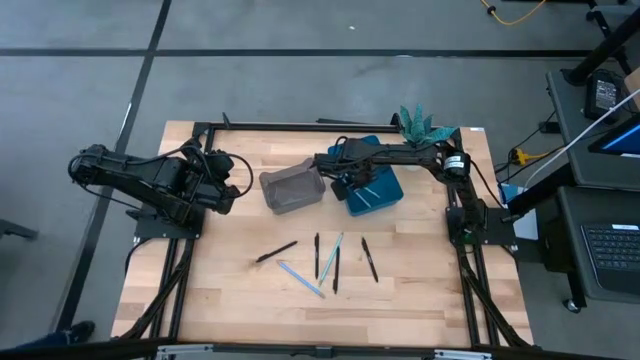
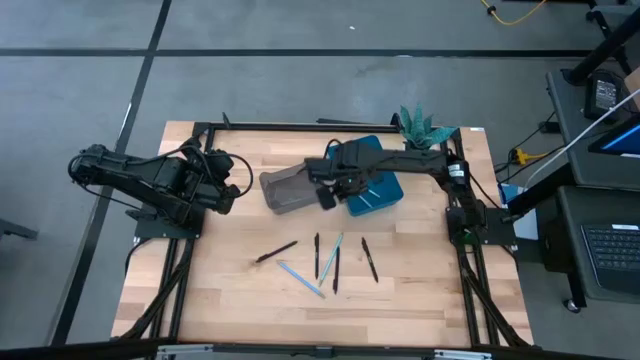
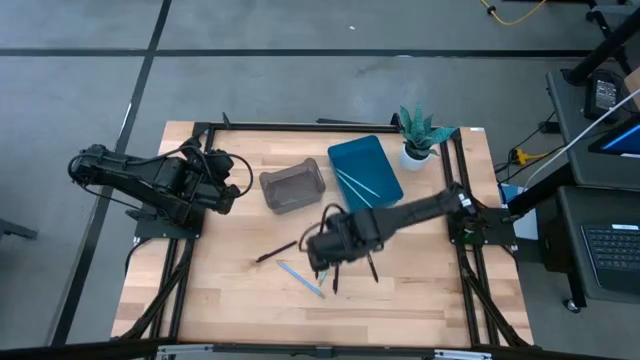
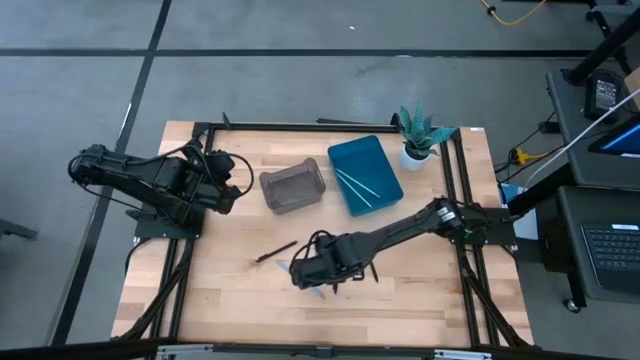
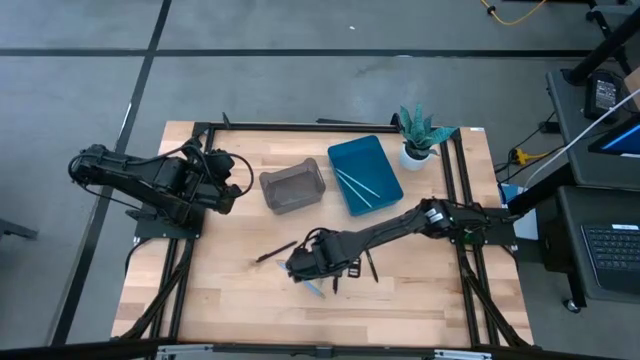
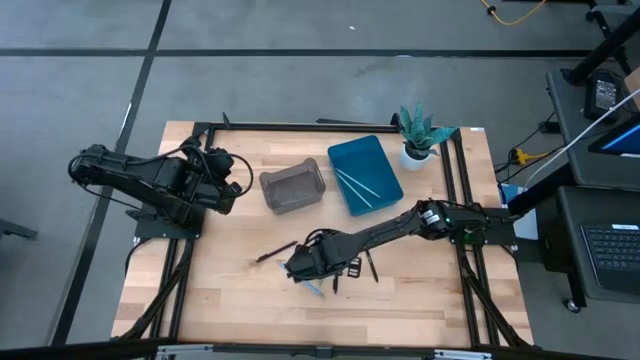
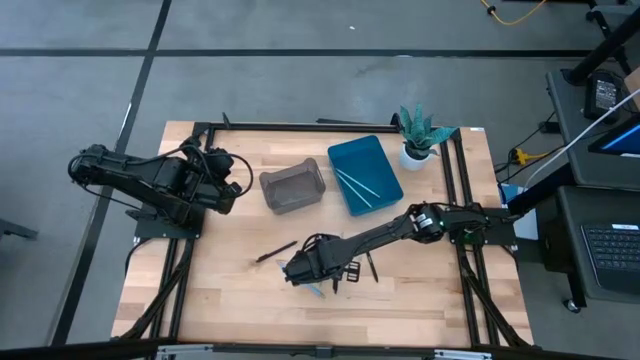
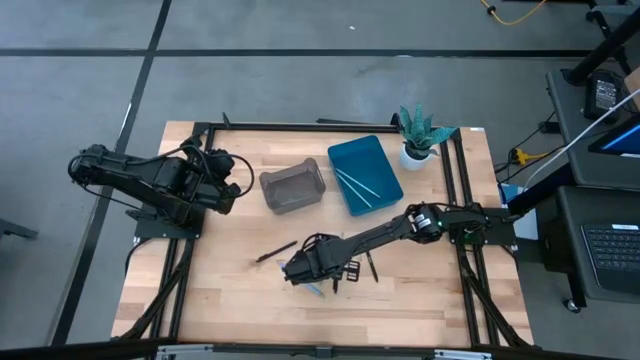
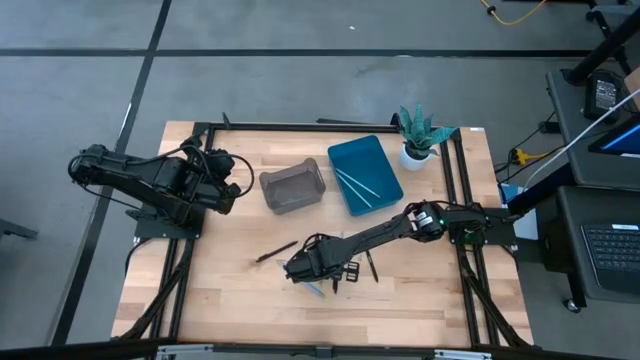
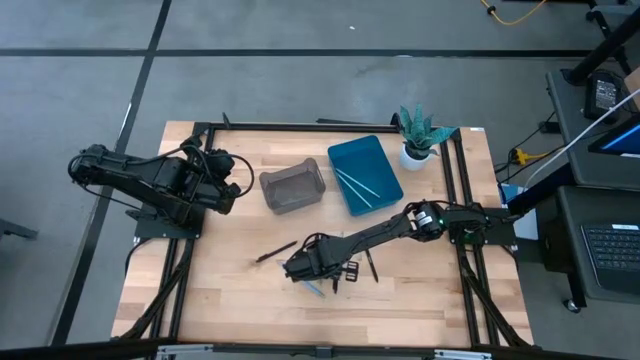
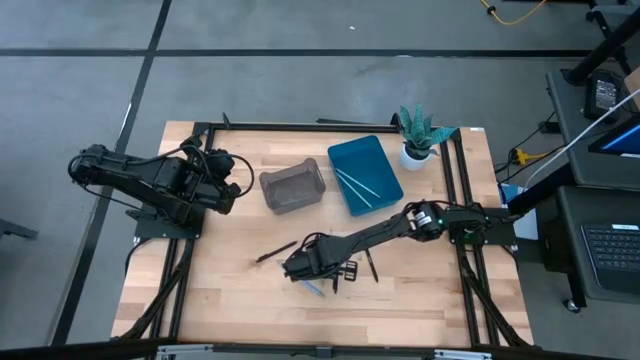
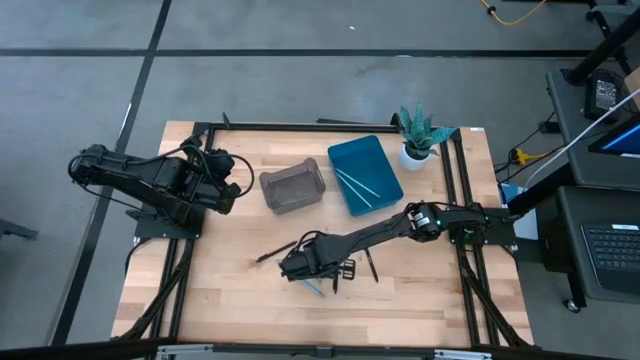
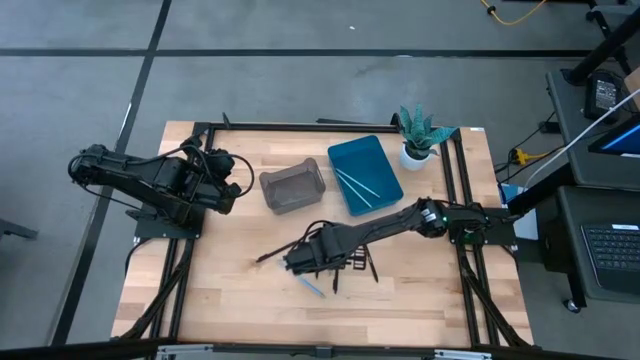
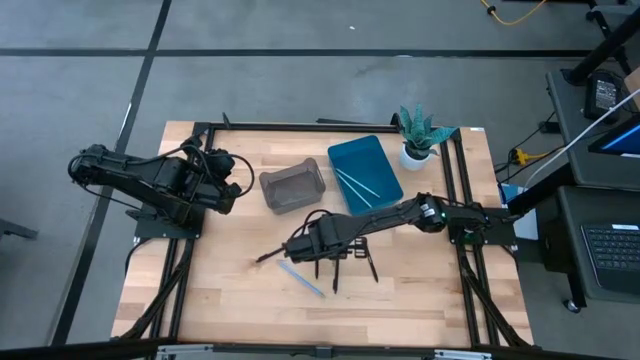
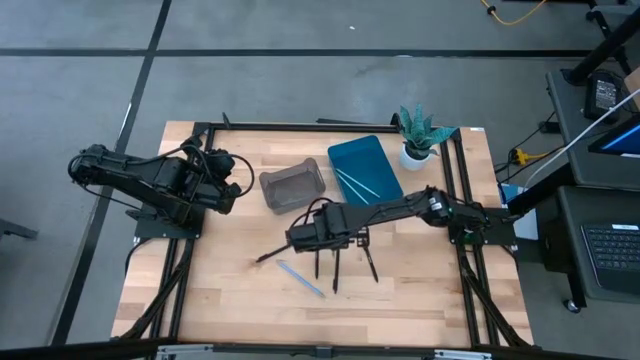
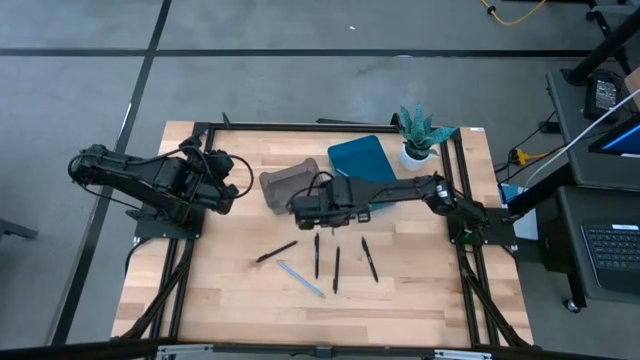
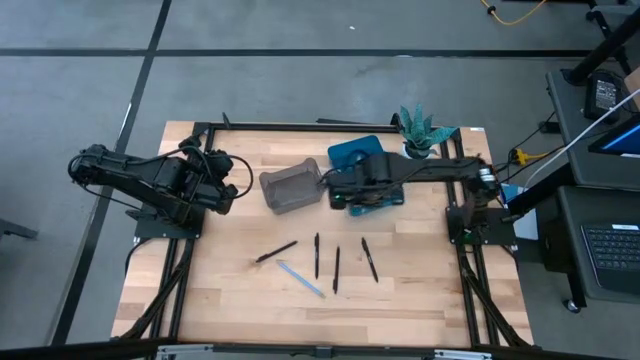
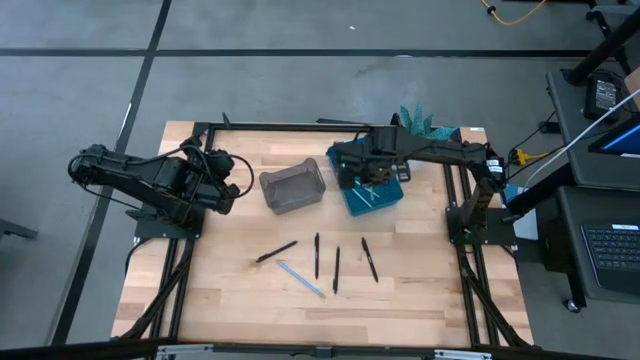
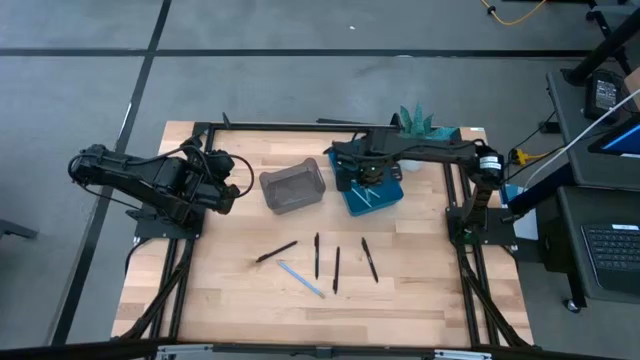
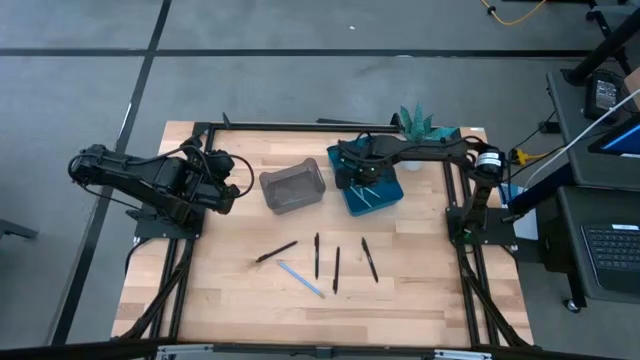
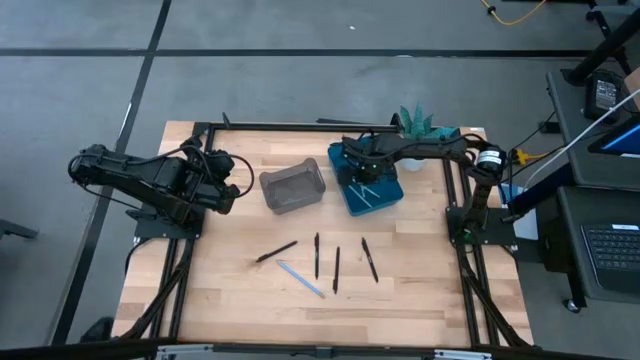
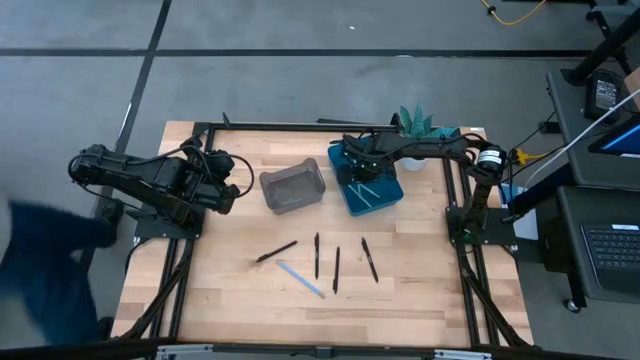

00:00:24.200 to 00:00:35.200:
Task: Sort pens & pencils
Put the light blue colored pencil into the blue bin

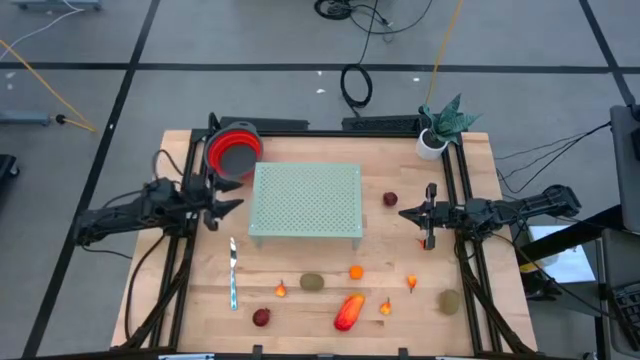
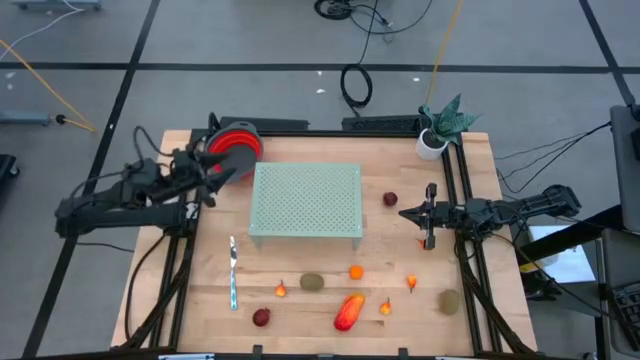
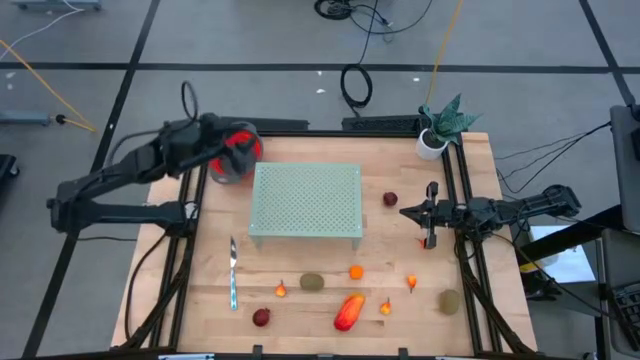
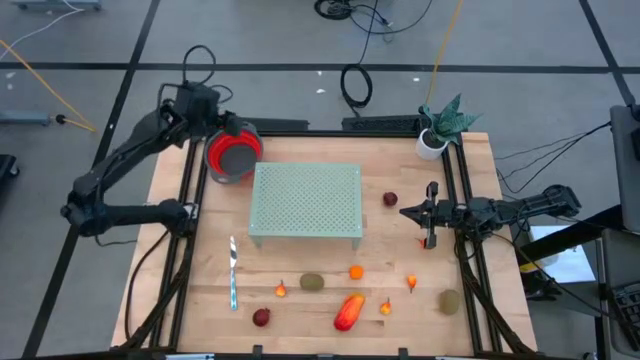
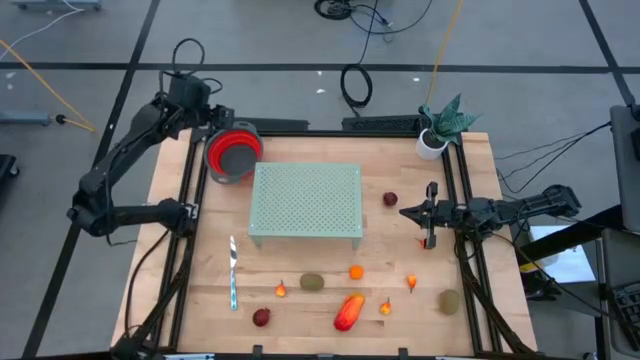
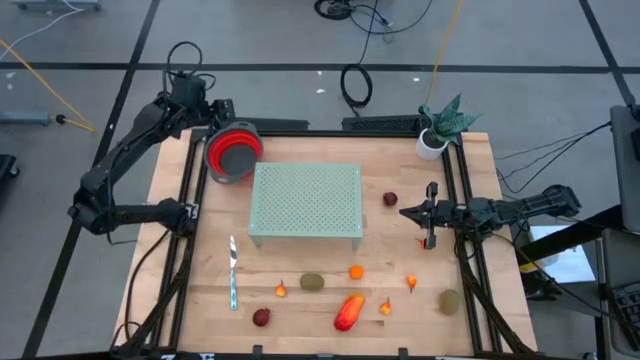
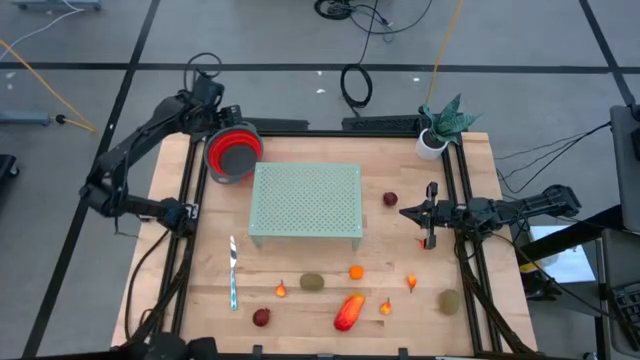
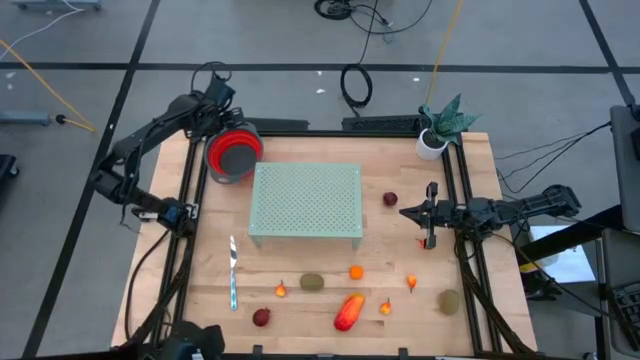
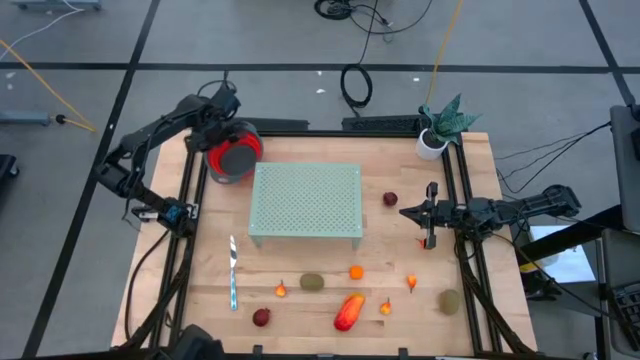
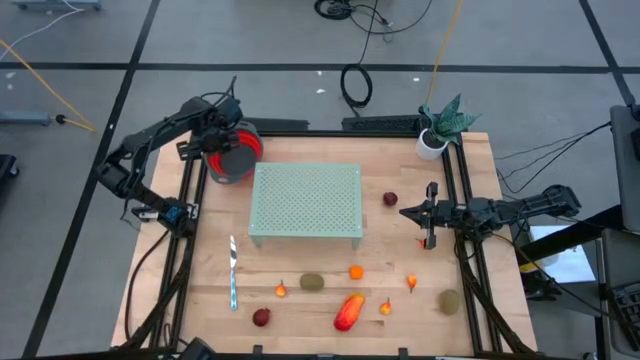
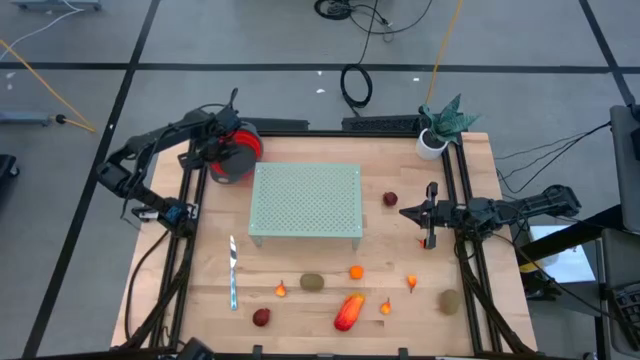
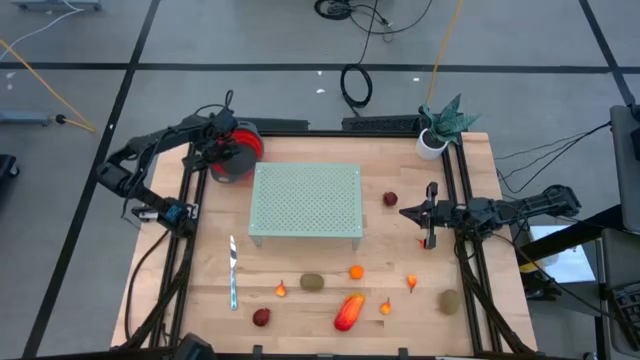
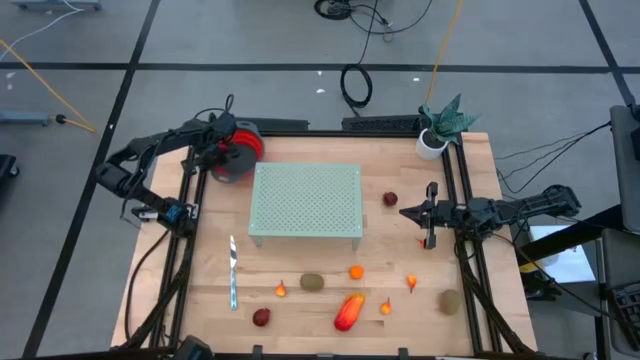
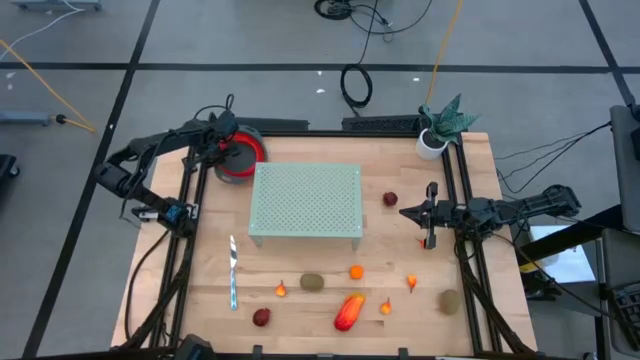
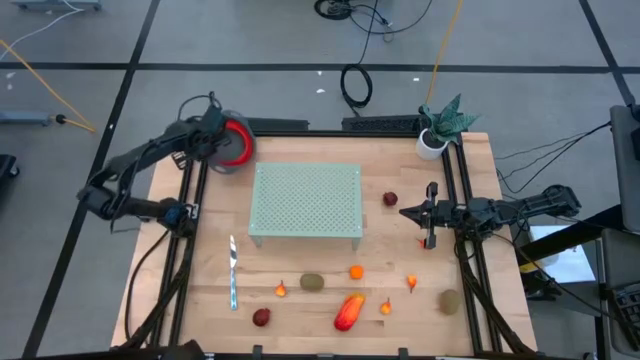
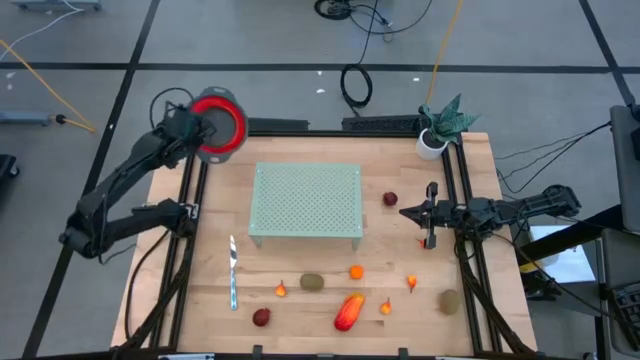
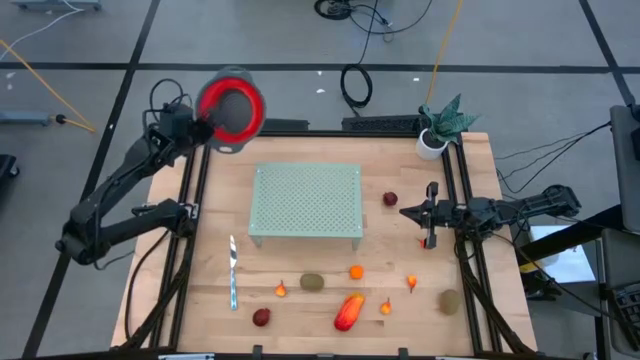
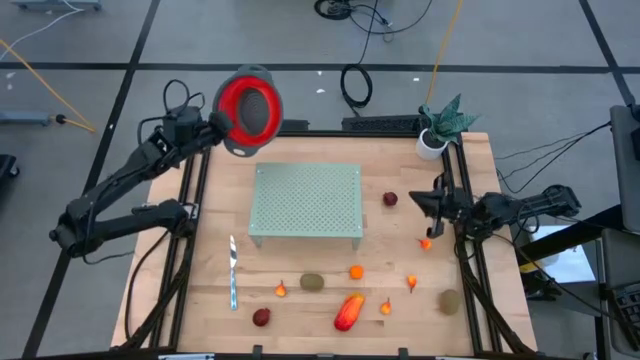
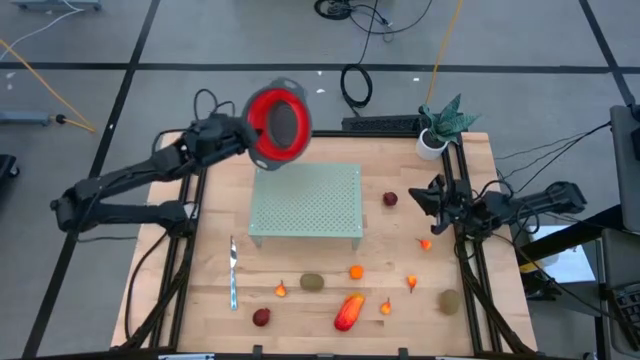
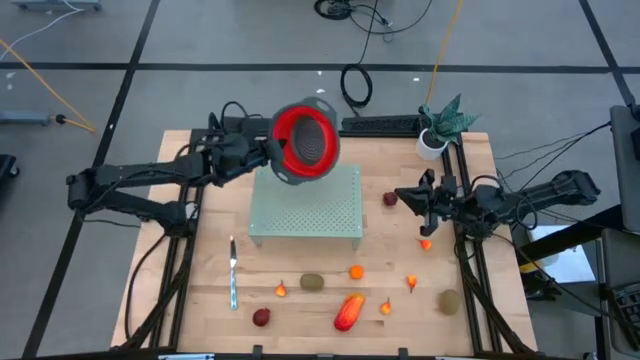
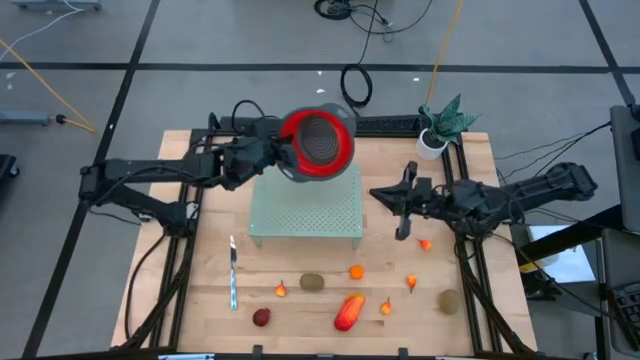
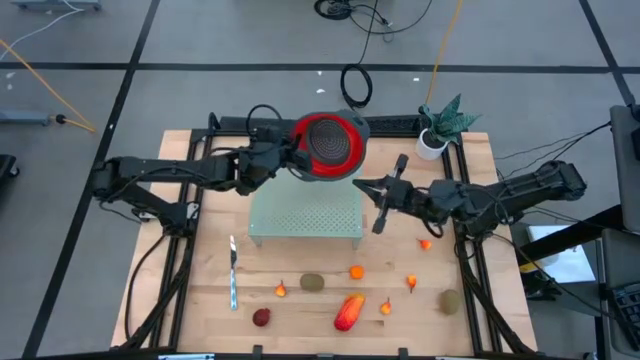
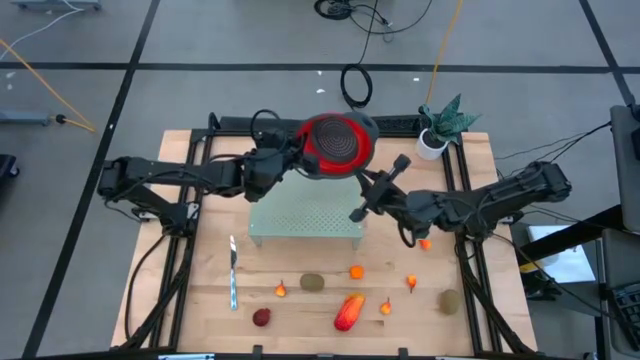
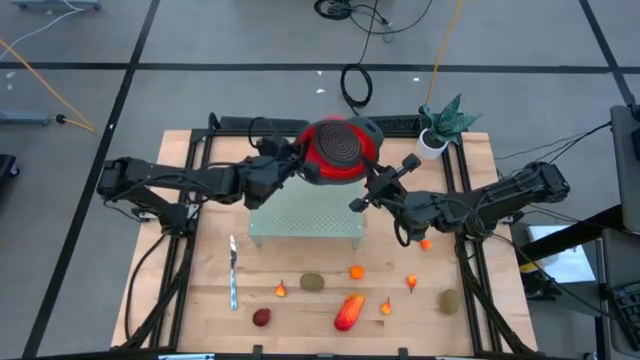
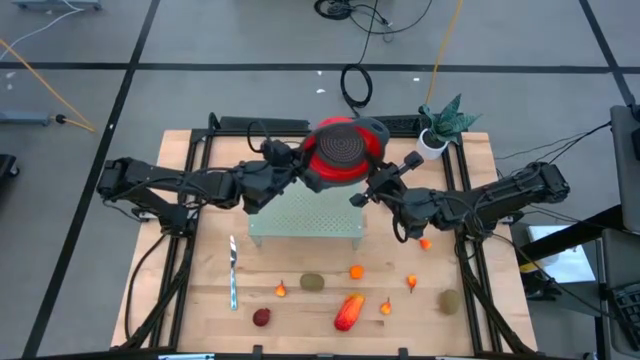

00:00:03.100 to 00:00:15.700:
Task: Pick & Place Fruit
Put the strainer bowl on the shelf
